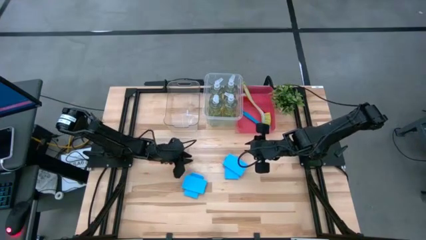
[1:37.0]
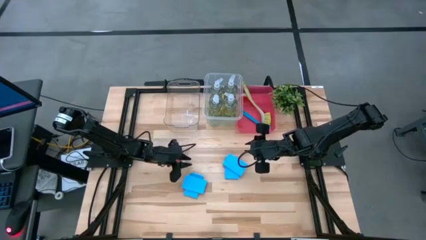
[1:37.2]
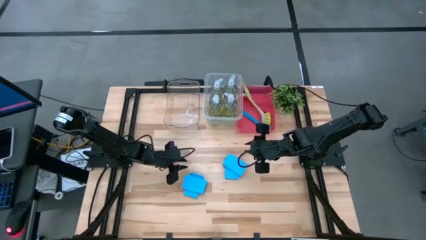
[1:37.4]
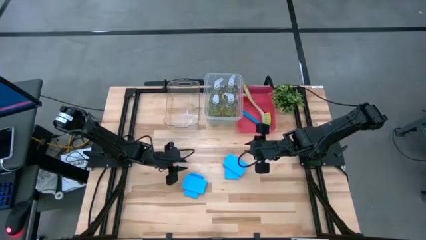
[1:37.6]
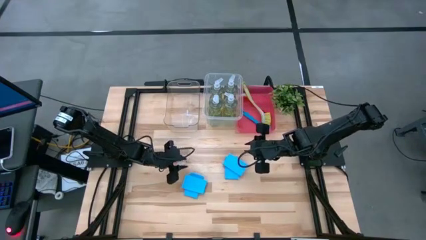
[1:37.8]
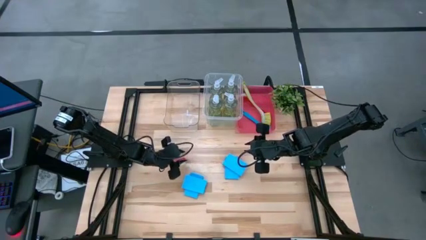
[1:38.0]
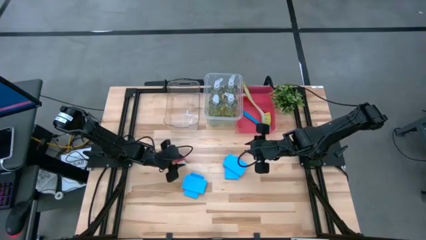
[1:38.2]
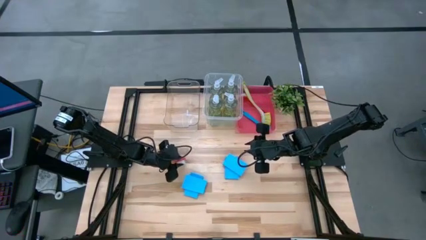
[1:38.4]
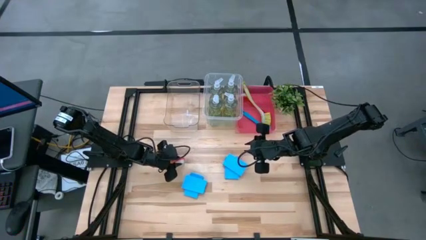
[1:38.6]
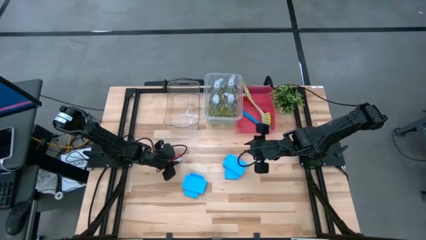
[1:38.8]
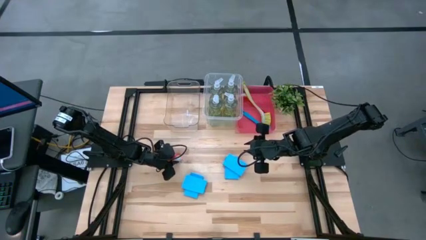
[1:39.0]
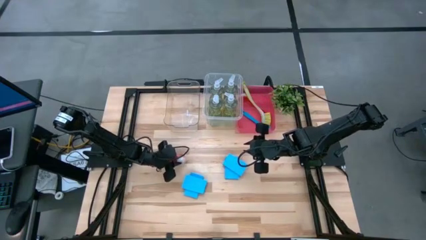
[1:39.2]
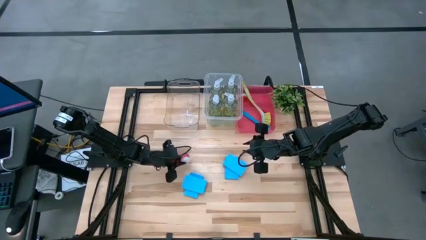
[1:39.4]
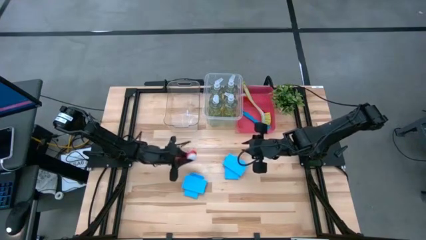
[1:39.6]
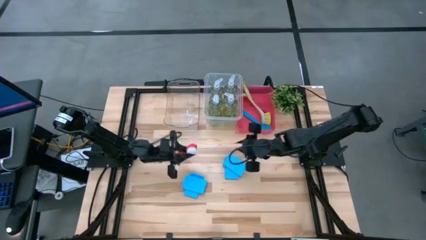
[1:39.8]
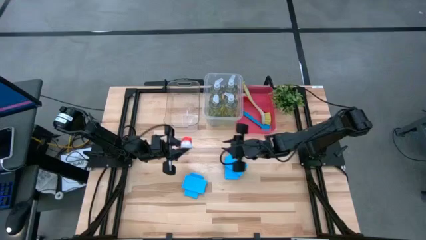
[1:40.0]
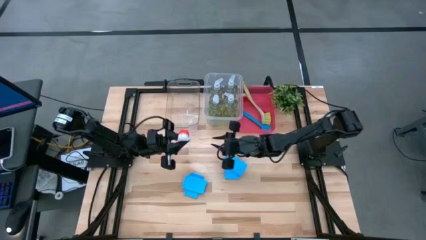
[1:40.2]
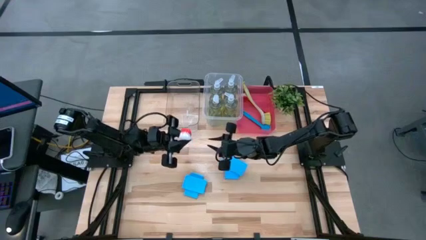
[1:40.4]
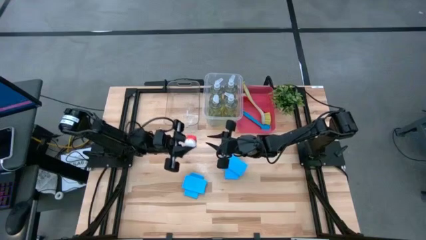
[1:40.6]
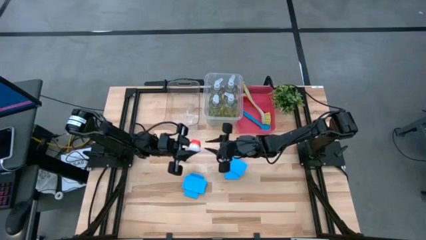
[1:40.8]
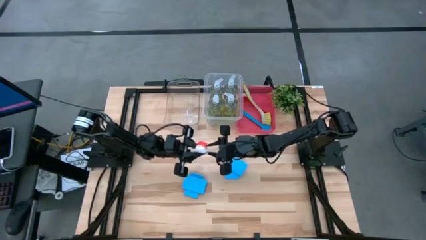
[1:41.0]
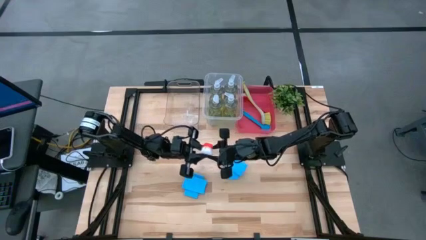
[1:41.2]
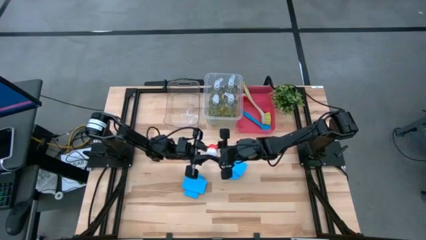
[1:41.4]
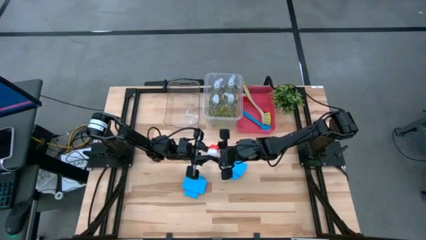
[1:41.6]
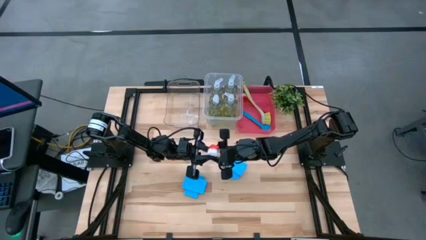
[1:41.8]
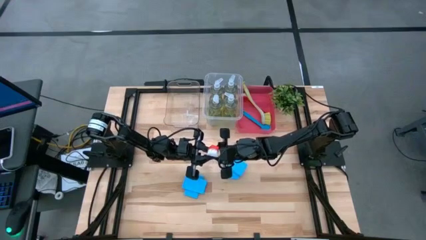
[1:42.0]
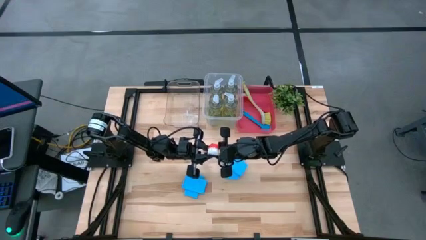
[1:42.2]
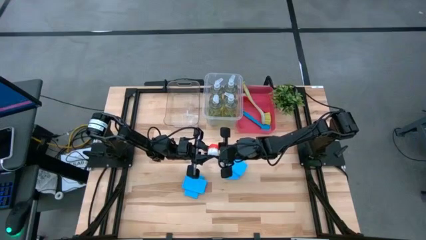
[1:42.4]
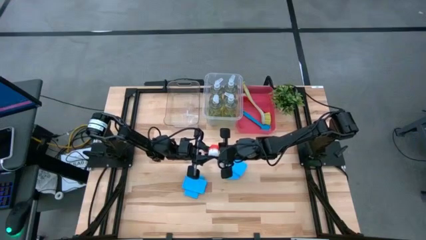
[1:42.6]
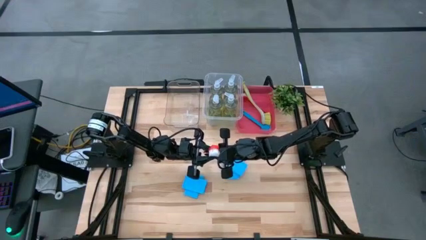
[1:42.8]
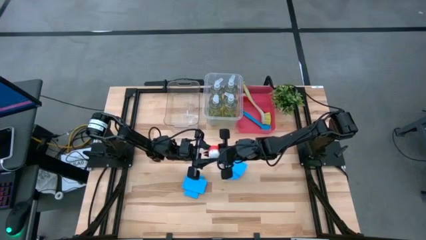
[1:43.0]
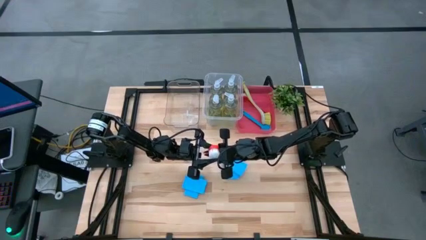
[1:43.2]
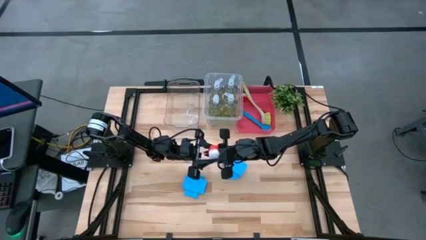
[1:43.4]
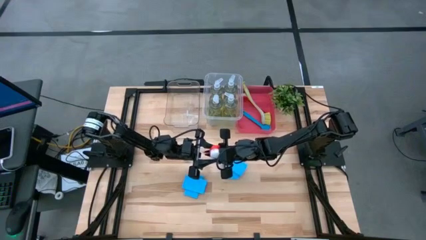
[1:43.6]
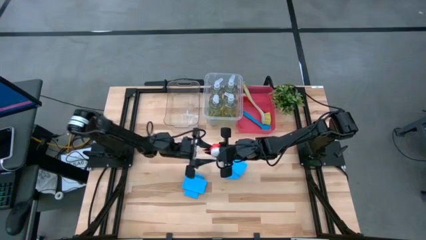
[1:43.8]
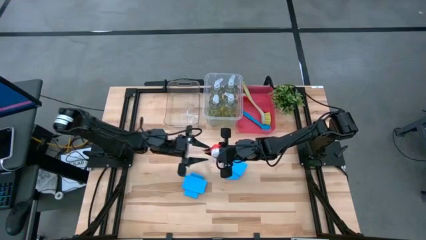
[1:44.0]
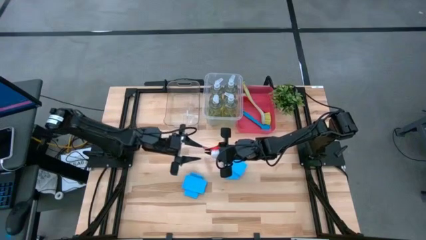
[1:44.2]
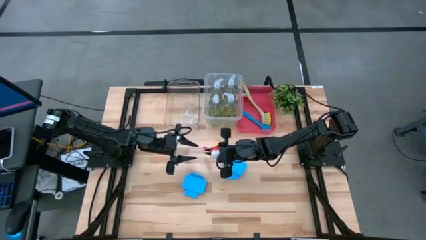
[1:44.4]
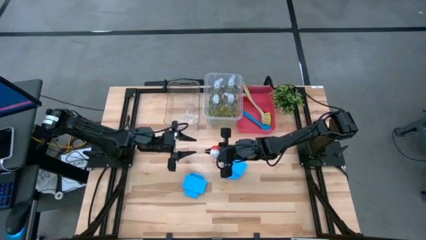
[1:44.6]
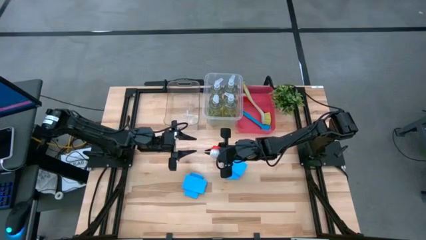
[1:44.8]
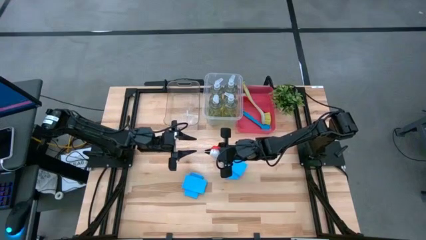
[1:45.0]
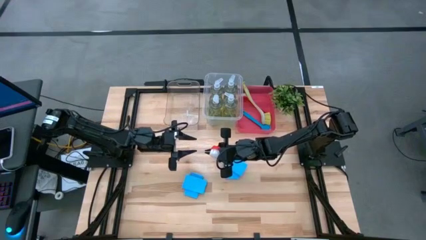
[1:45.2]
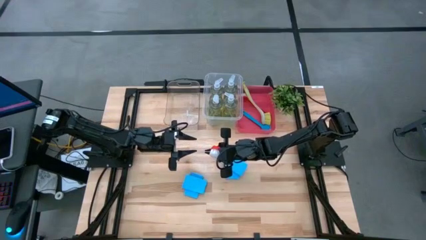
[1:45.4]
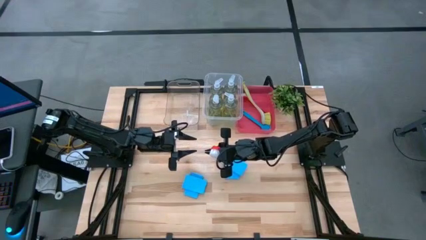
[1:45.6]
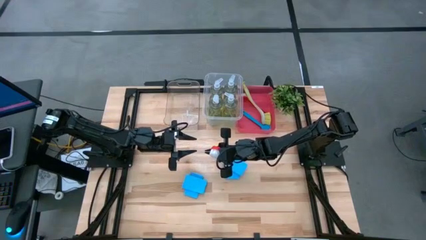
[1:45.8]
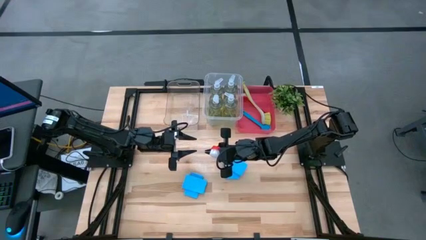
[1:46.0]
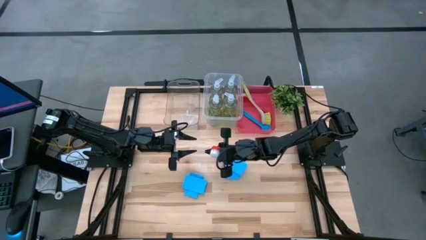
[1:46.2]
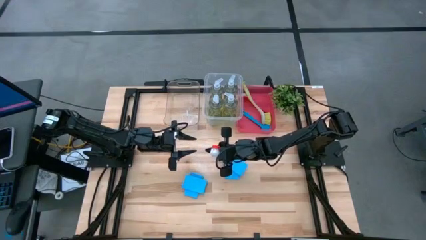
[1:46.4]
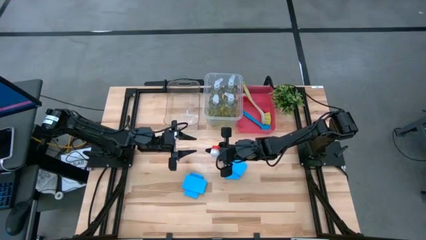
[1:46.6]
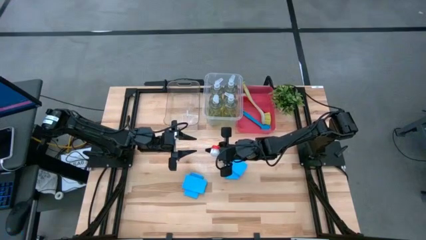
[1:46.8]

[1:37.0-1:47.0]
Task: Pick & Place Kitchen Sink Supplies
Put the red dish brush into the pink bin

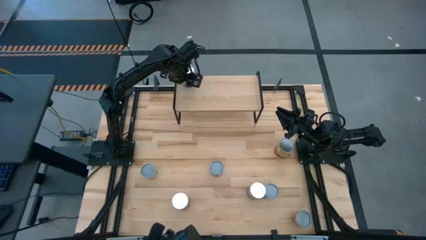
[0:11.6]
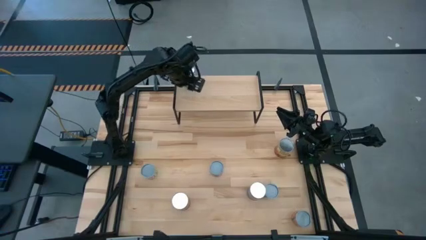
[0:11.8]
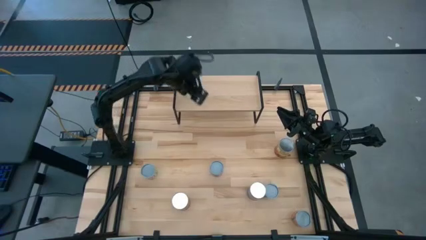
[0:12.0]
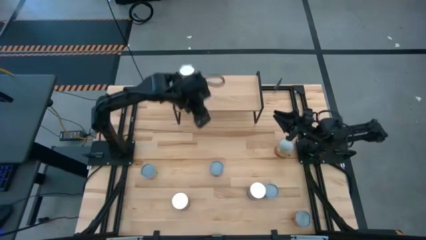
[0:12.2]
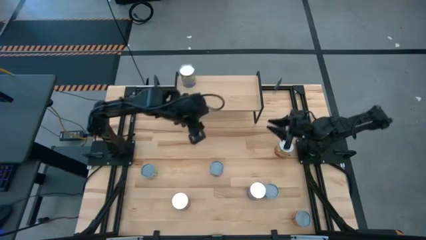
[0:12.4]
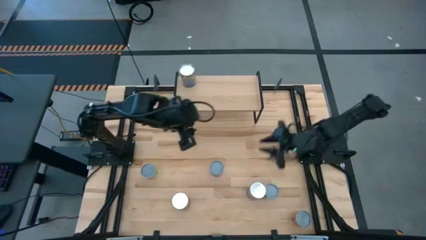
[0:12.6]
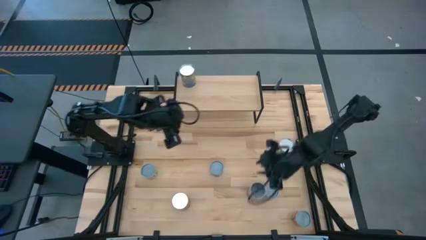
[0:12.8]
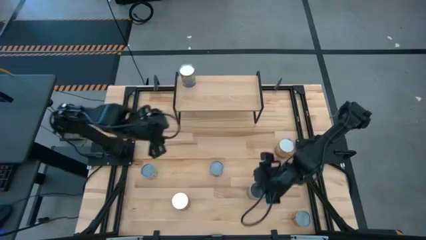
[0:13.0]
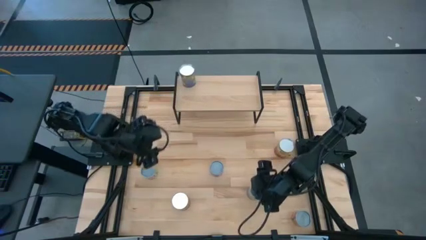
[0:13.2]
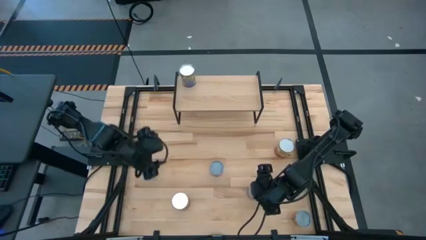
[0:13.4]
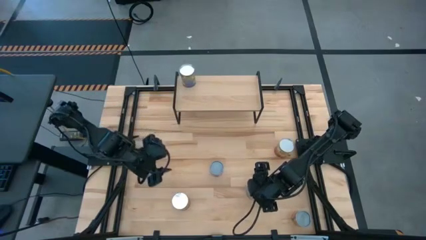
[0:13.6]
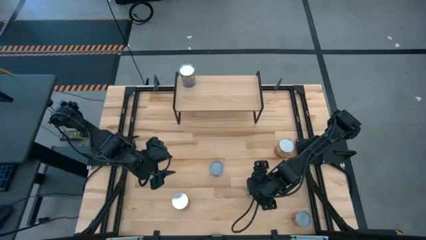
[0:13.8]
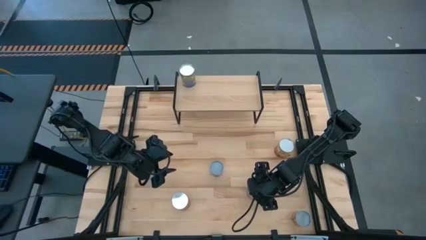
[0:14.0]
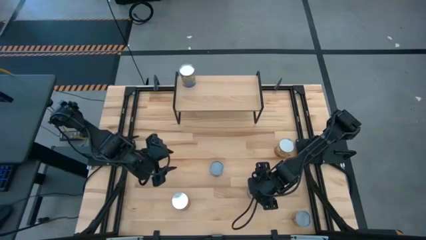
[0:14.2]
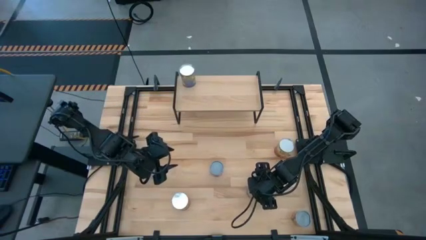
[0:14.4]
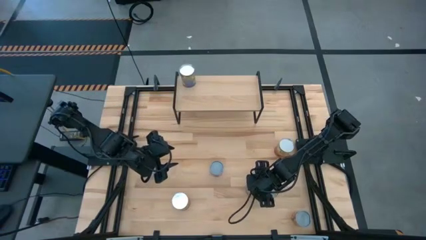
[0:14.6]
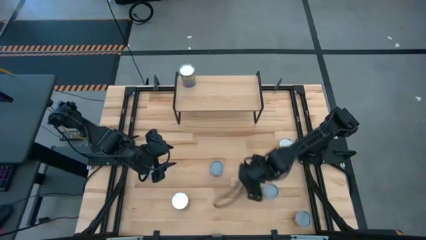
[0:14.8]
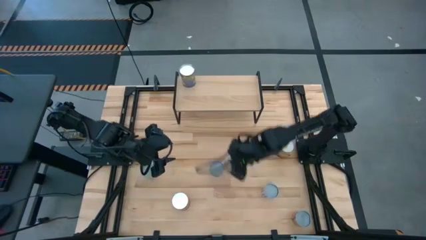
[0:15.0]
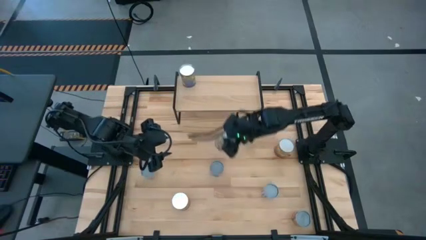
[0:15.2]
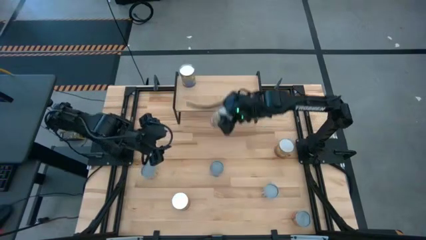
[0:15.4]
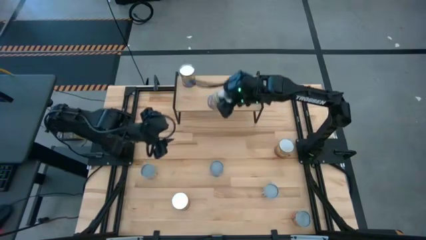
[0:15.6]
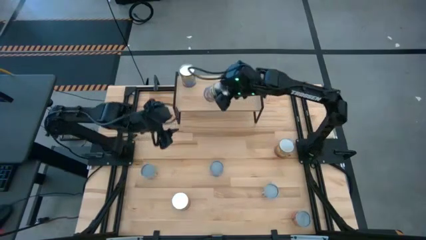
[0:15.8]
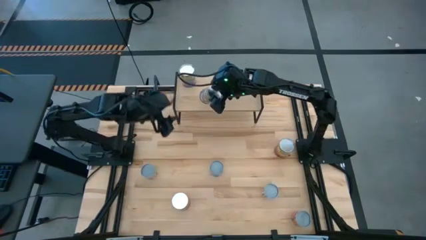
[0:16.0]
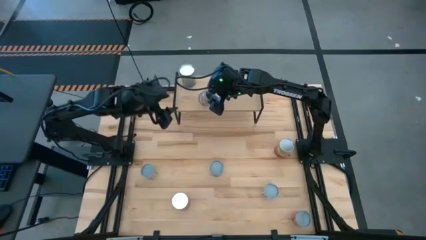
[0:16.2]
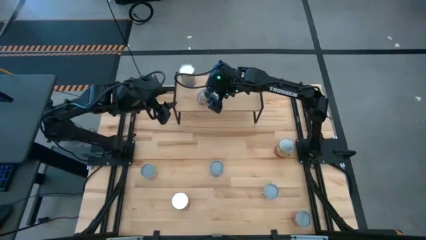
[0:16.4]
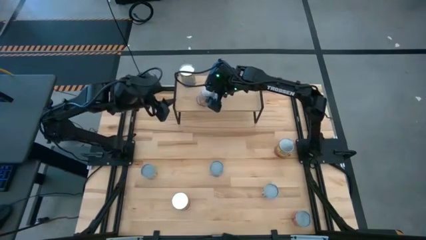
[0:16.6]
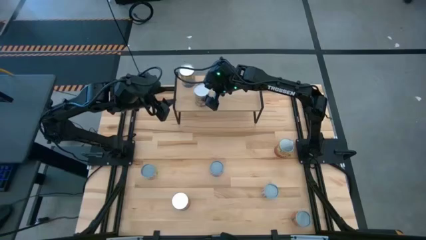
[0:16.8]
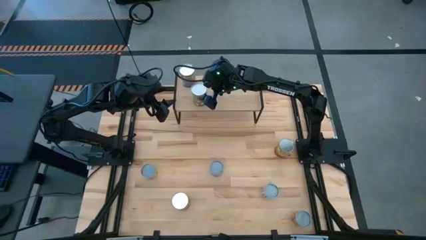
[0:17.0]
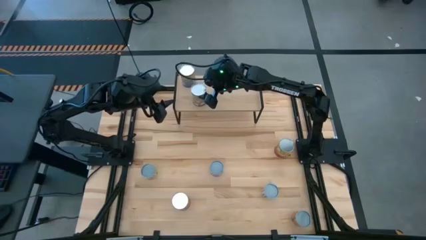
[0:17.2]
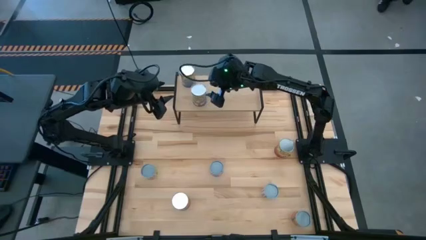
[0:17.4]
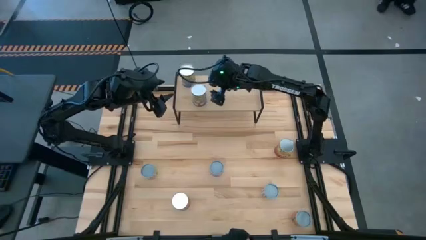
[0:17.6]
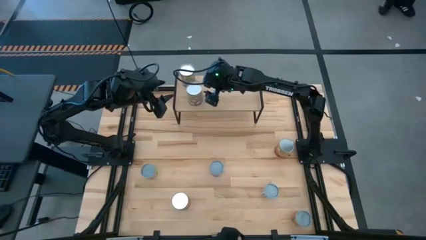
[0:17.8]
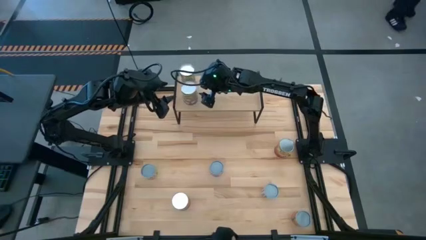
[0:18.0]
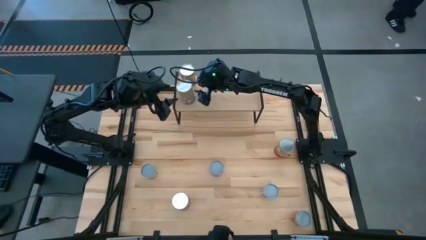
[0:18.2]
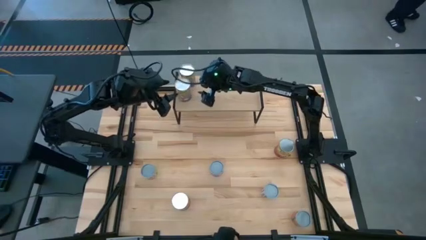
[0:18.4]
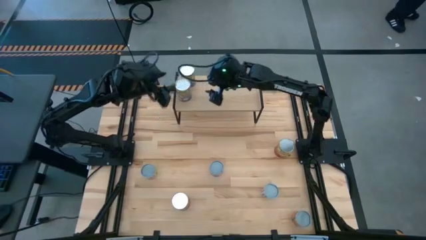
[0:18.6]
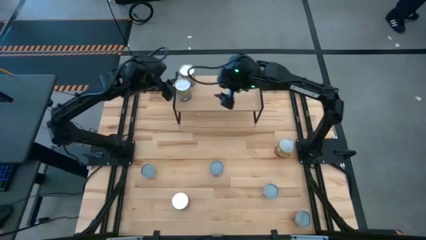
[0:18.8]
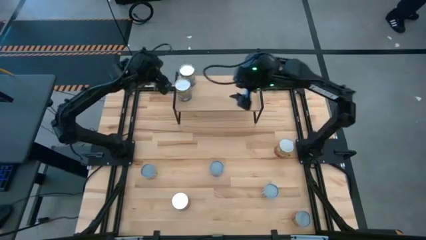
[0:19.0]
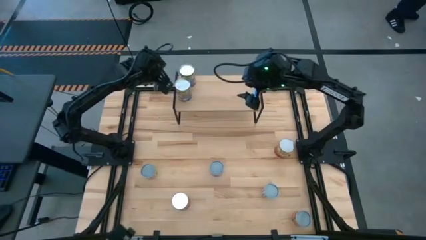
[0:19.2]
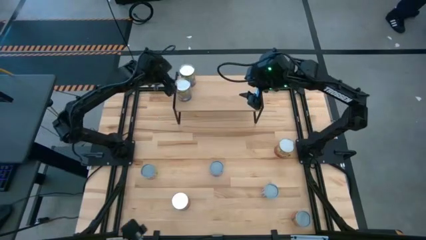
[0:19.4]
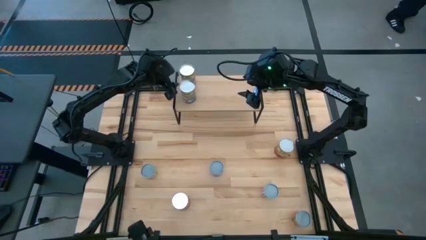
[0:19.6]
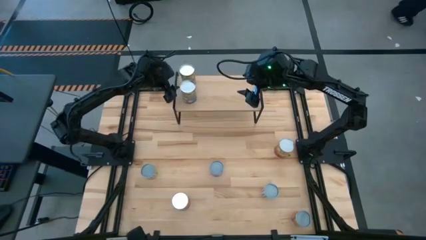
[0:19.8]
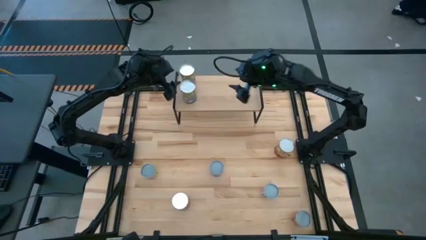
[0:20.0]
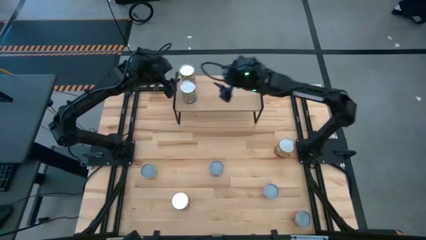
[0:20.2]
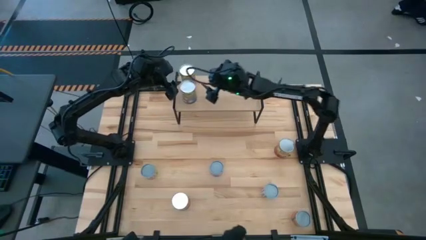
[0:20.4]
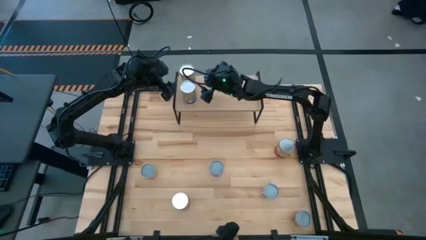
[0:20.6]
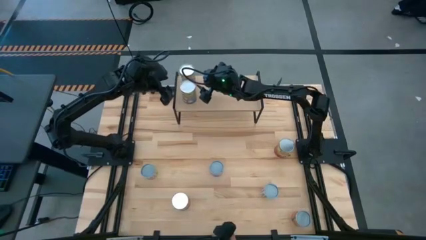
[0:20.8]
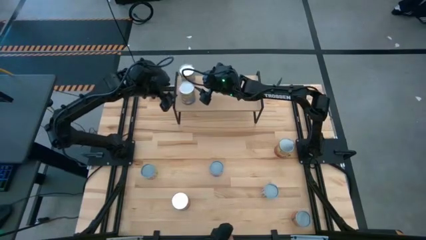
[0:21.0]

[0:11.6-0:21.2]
Task: Pick and place cans onto a shelf
Put the canned peaches on the shelf
